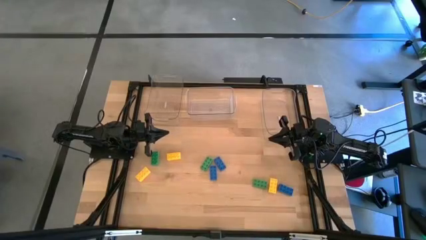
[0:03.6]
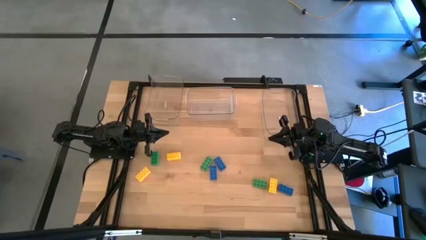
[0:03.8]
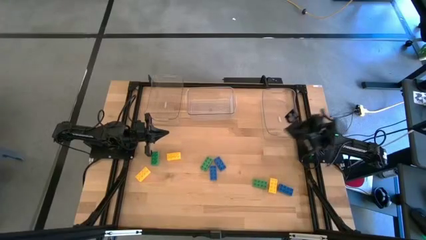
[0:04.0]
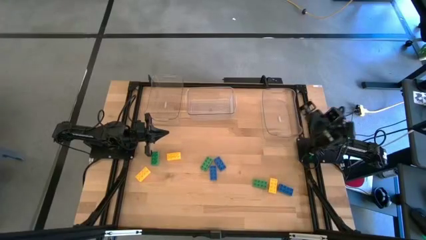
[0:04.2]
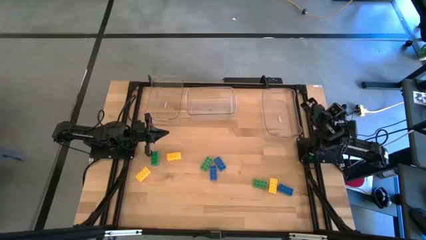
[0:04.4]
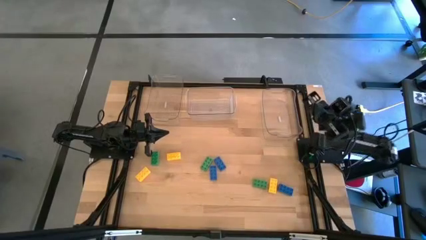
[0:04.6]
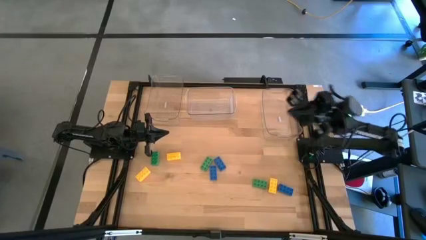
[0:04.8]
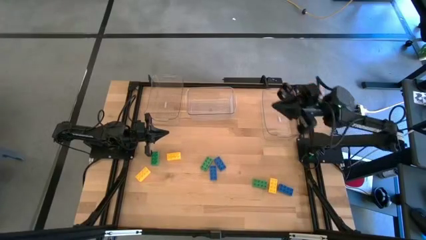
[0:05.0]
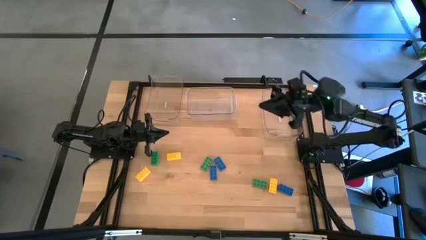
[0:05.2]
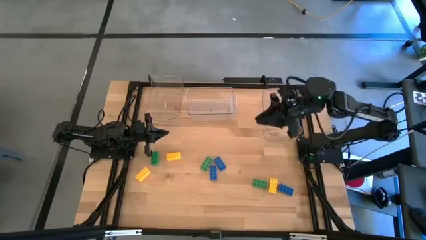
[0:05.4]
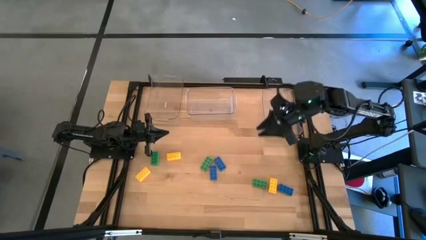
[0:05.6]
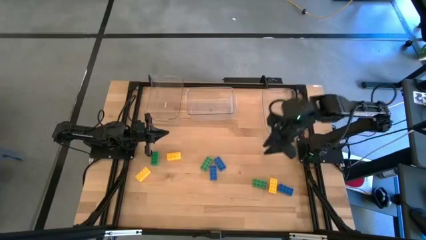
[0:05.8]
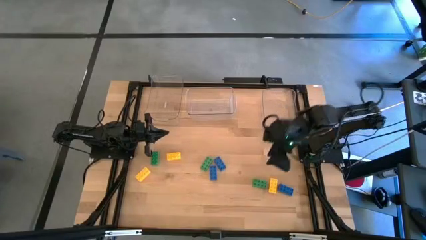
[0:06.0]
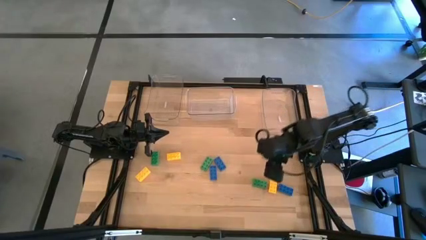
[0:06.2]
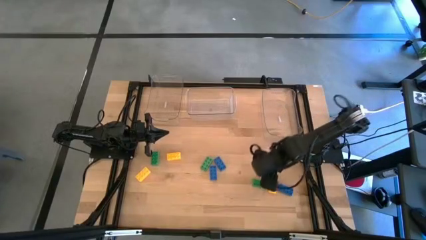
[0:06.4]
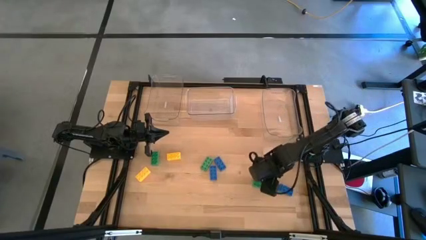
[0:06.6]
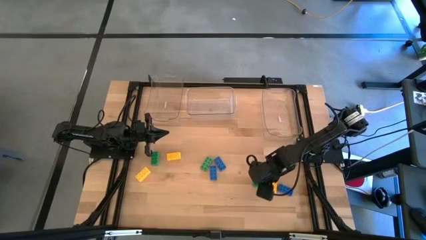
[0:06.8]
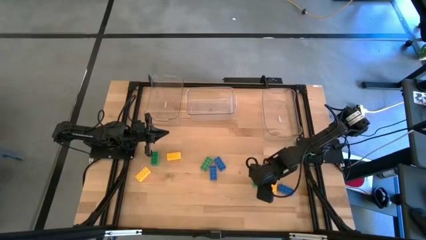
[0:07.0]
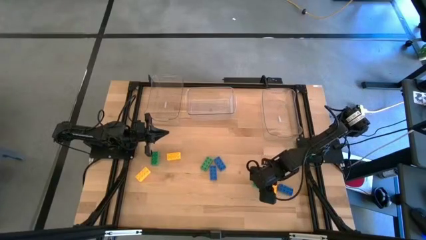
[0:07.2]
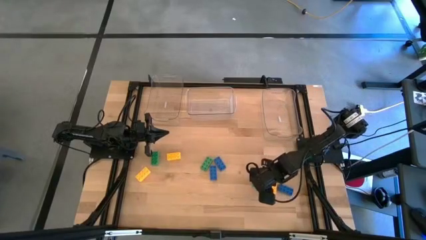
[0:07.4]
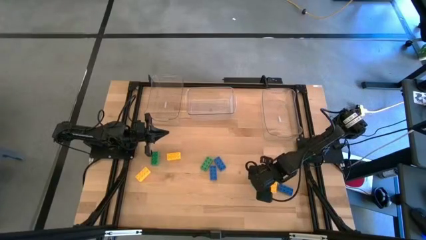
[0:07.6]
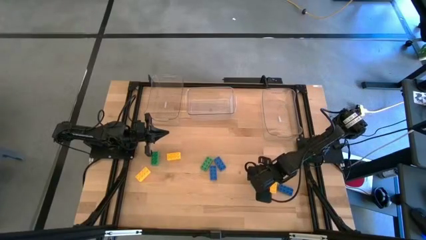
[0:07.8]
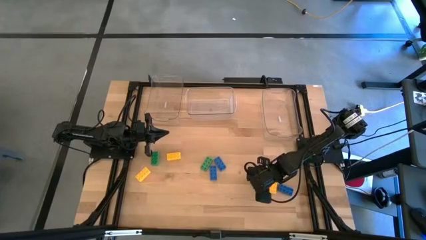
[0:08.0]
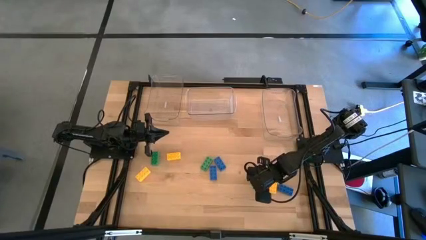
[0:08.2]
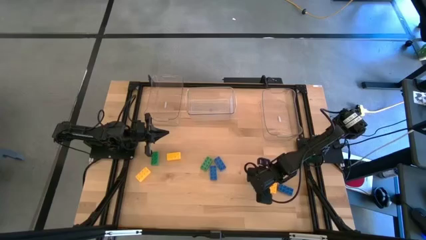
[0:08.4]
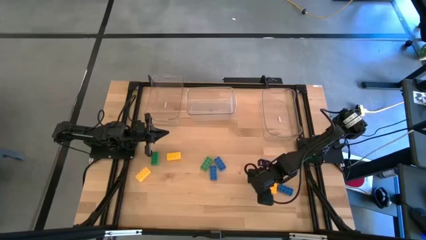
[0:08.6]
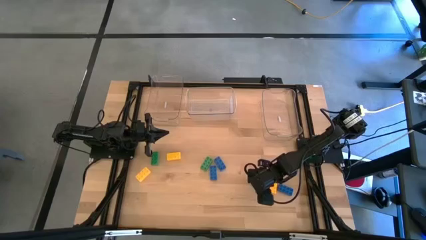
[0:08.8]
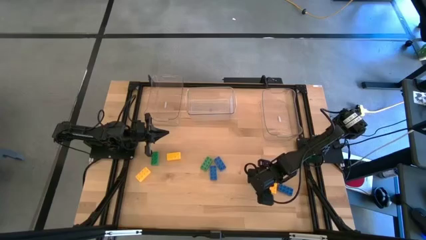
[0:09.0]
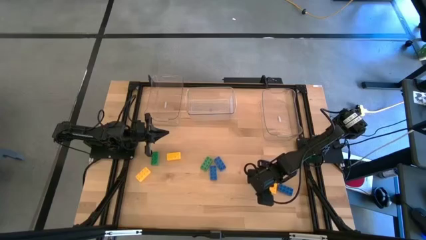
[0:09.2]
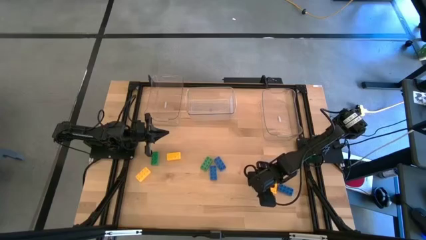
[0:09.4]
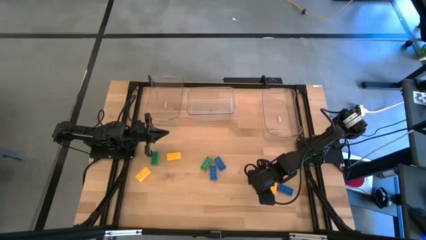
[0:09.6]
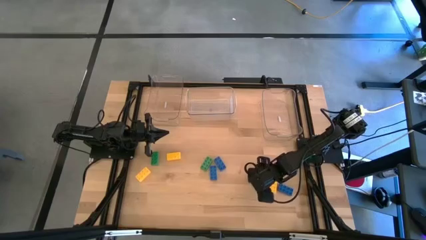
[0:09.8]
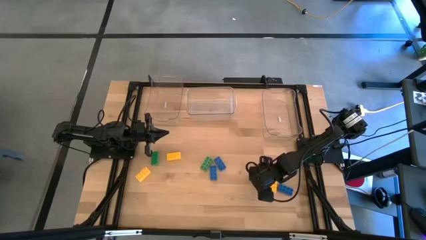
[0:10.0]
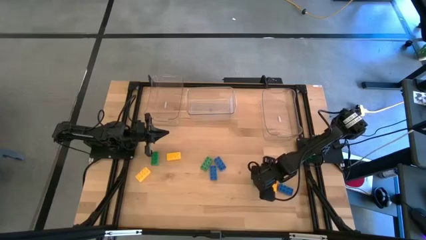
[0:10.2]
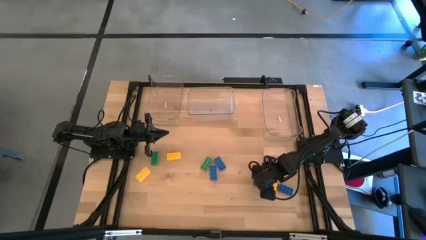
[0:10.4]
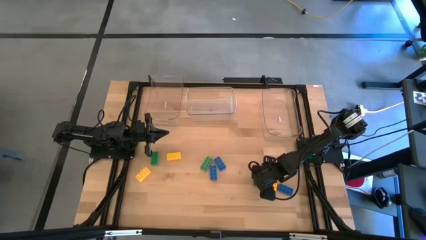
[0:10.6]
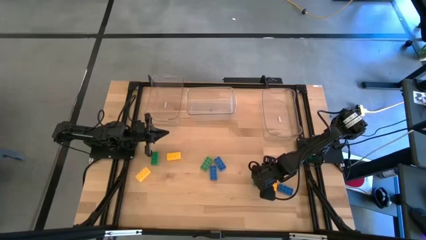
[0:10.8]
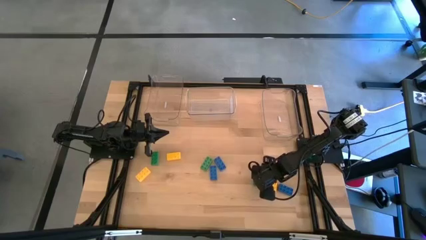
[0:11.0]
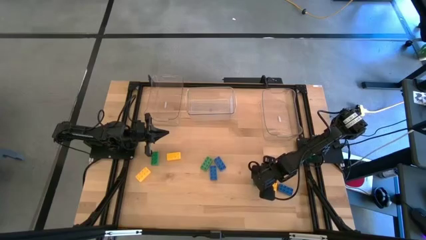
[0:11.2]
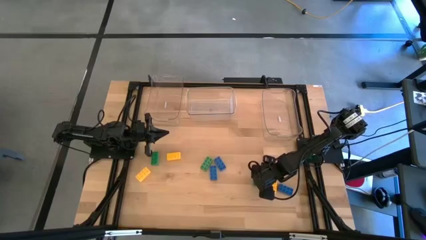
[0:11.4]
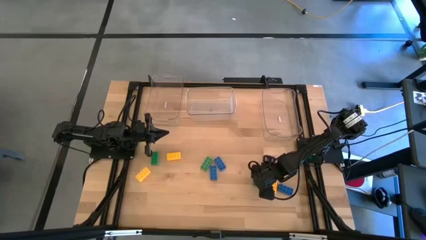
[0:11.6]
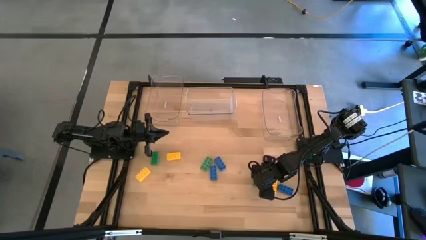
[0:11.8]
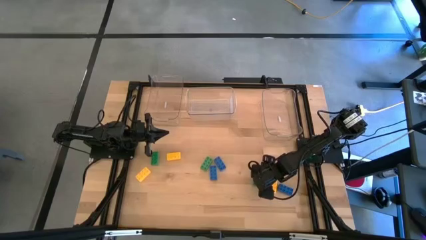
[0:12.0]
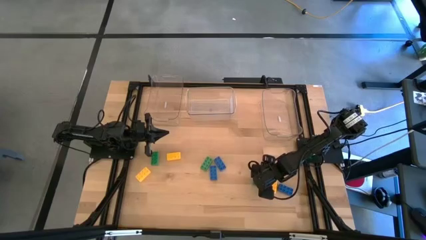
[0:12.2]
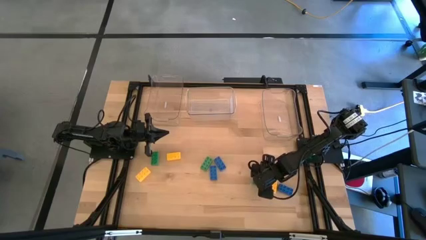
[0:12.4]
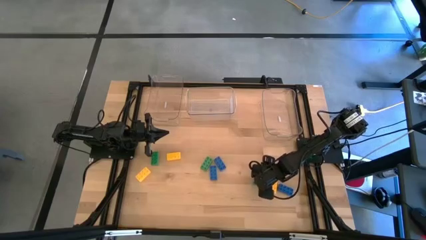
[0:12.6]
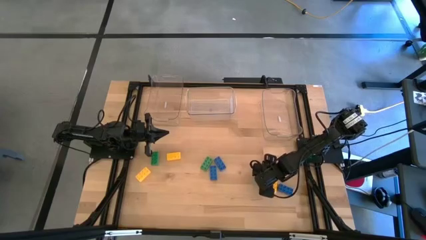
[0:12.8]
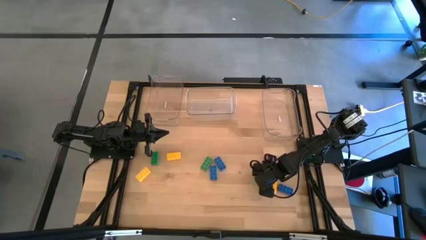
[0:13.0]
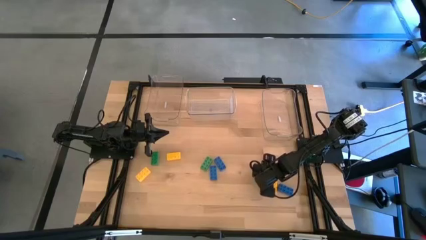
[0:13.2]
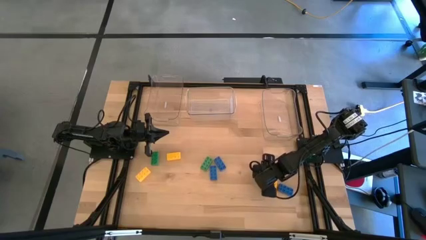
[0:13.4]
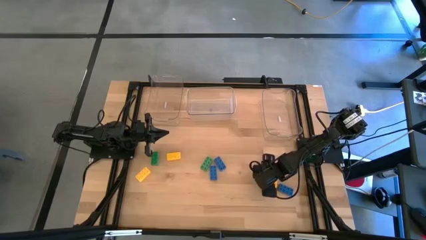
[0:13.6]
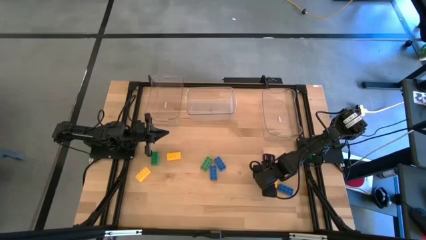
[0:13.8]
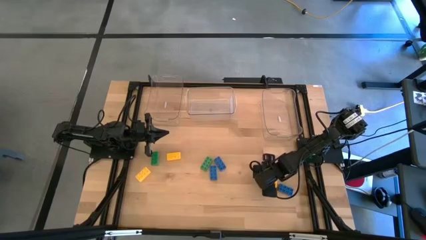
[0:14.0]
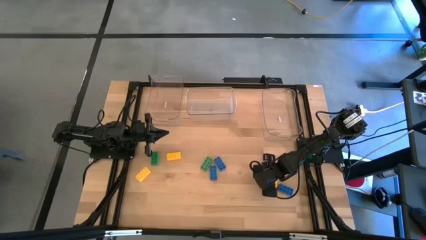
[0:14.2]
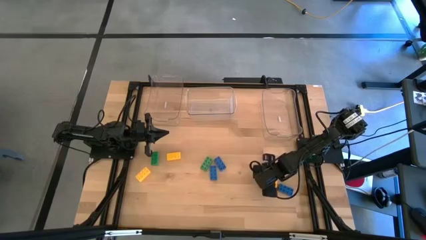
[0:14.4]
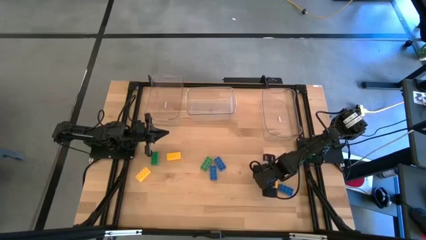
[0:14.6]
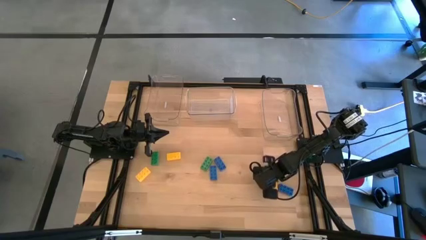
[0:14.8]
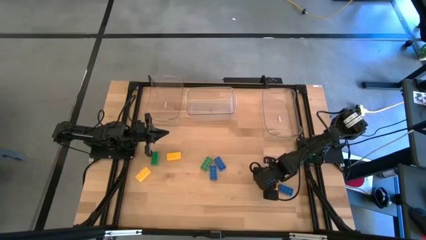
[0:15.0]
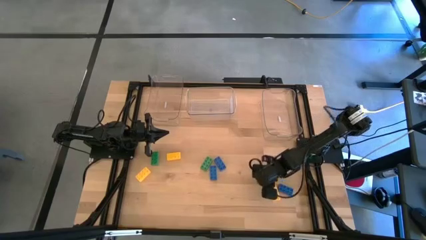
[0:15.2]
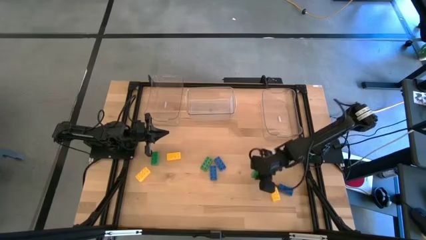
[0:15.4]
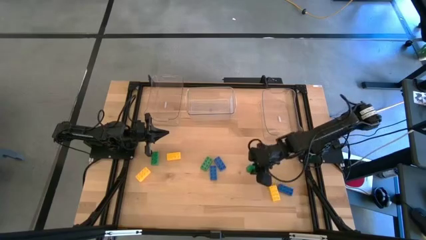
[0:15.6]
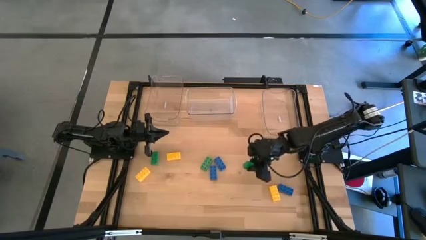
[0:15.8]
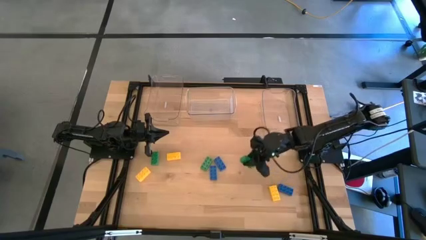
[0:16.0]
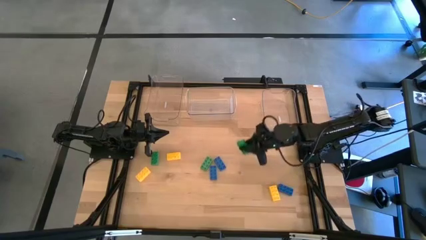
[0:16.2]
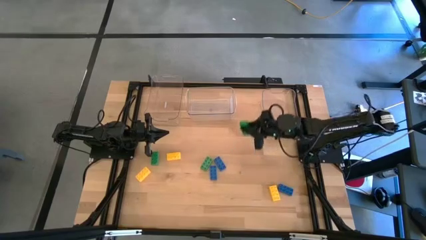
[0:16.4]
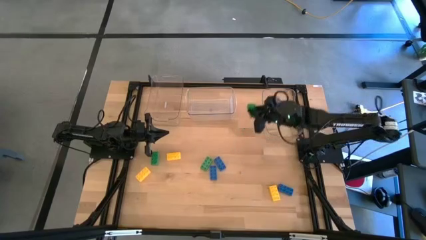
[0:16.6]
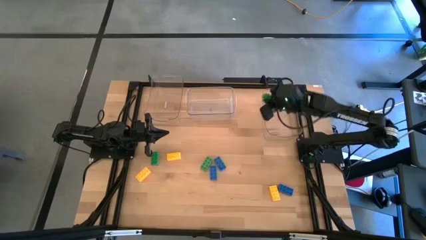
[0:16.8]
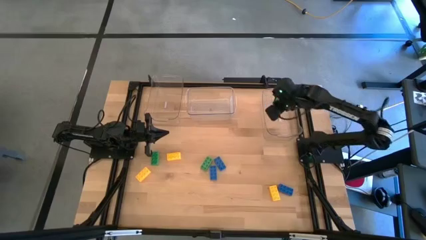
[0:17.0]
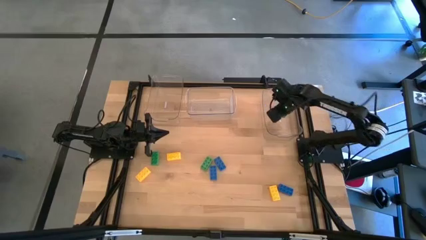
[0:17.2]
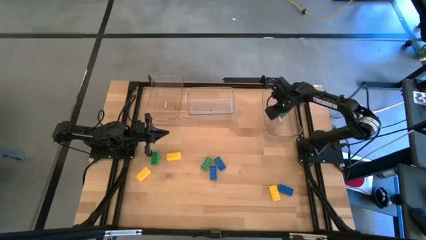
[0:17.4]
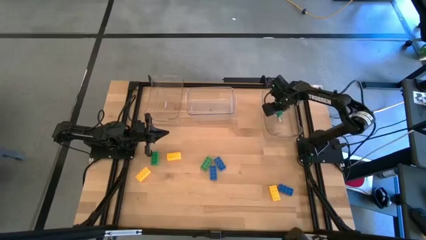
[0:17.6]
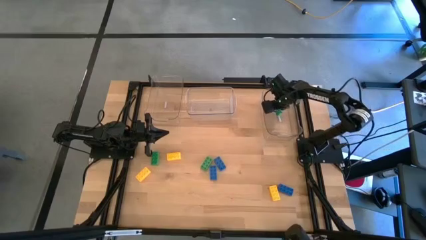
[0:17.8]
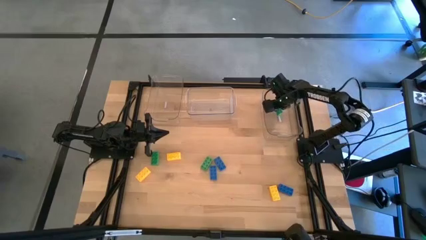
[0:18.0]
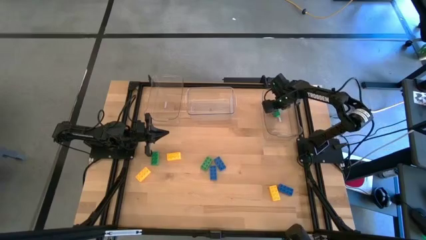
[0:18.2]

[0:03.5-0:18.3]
Task: Sort & place blocks by color
Put the right green game piece into the right transparent bin
